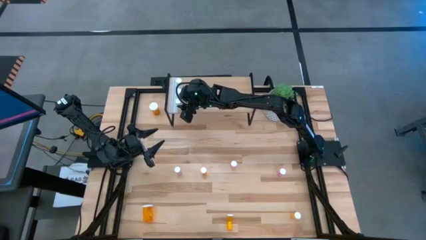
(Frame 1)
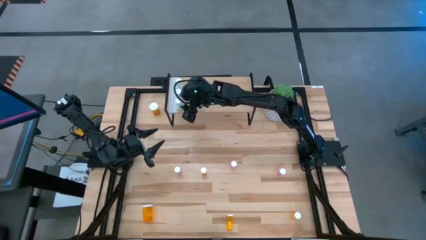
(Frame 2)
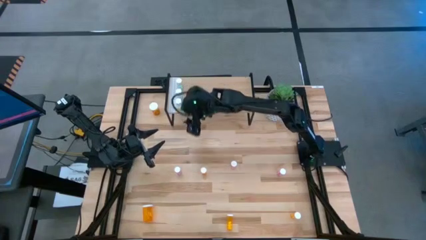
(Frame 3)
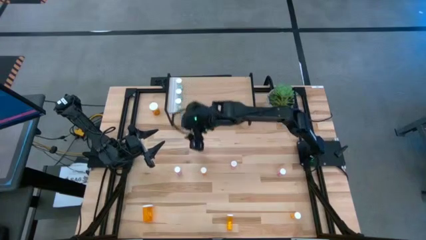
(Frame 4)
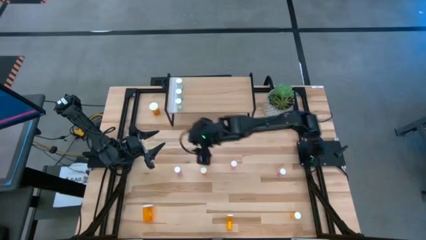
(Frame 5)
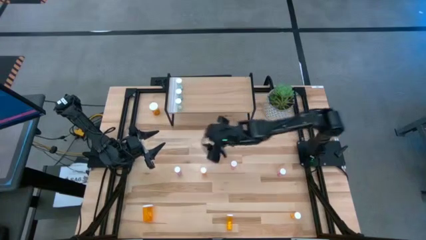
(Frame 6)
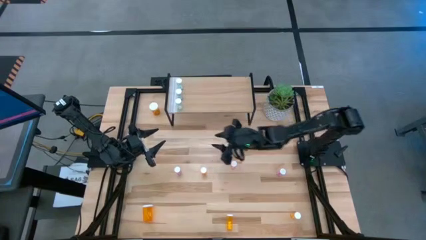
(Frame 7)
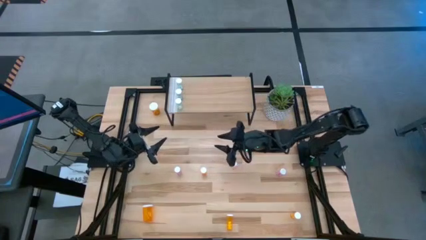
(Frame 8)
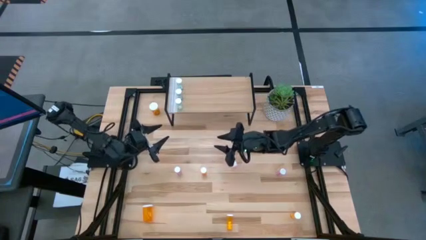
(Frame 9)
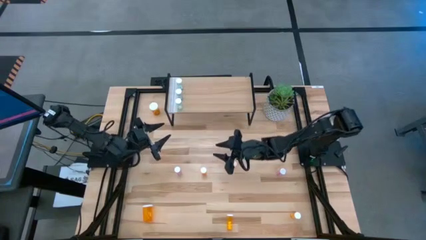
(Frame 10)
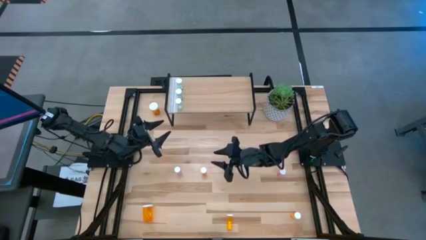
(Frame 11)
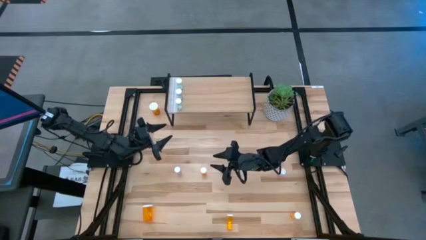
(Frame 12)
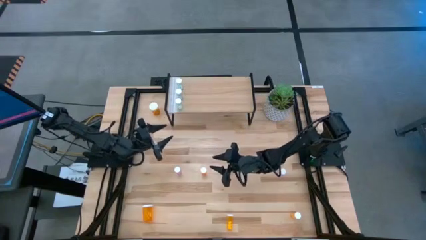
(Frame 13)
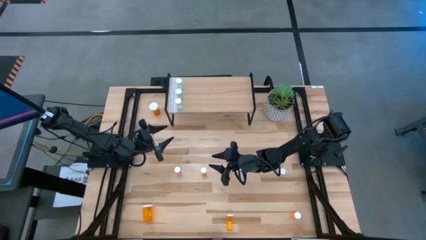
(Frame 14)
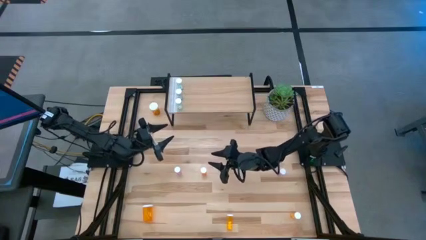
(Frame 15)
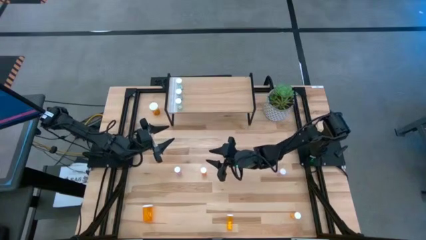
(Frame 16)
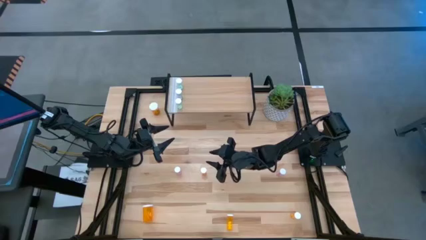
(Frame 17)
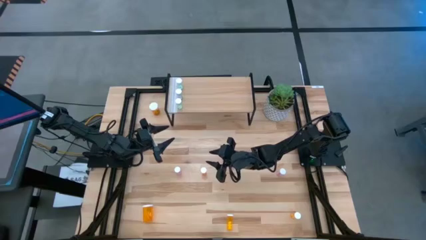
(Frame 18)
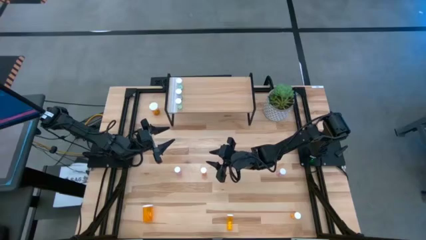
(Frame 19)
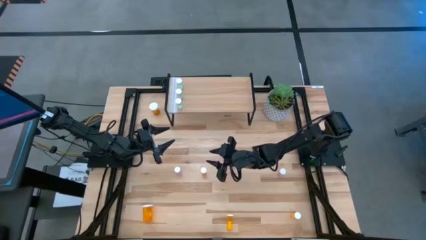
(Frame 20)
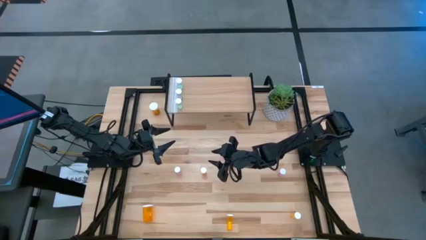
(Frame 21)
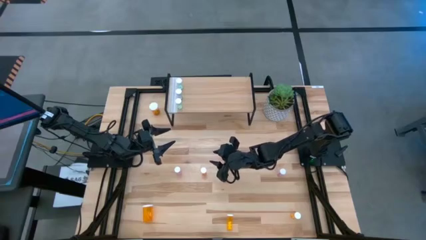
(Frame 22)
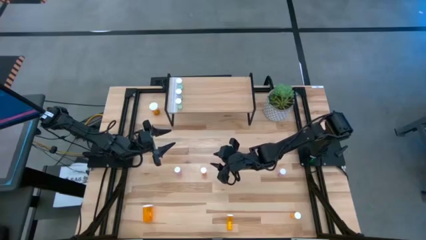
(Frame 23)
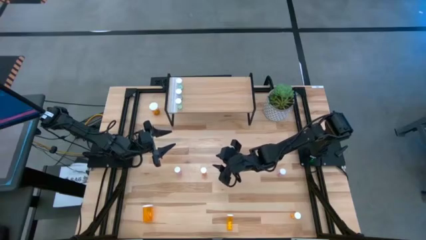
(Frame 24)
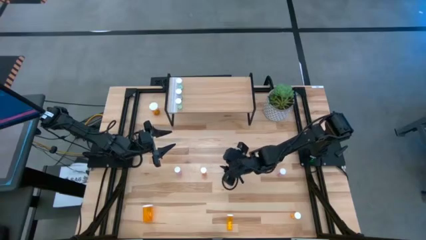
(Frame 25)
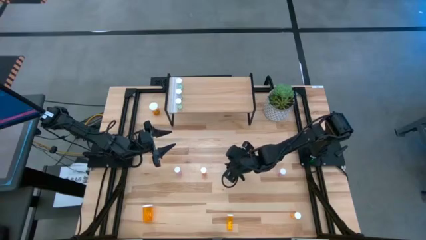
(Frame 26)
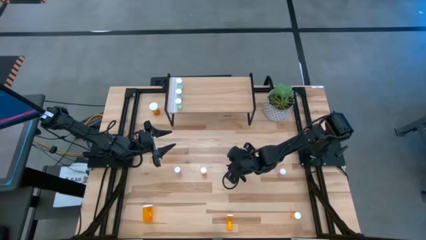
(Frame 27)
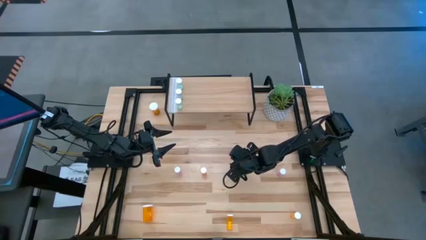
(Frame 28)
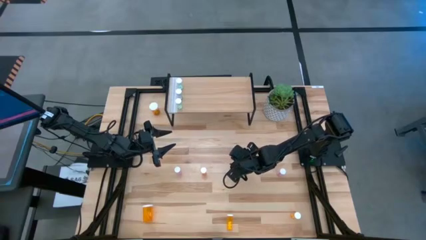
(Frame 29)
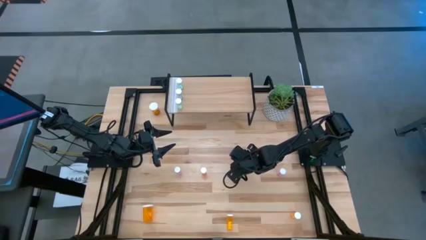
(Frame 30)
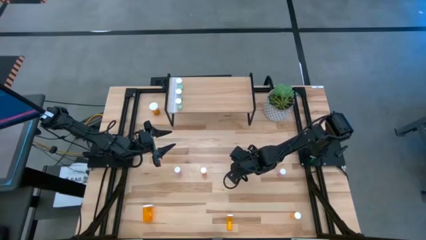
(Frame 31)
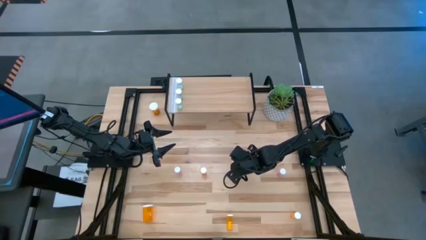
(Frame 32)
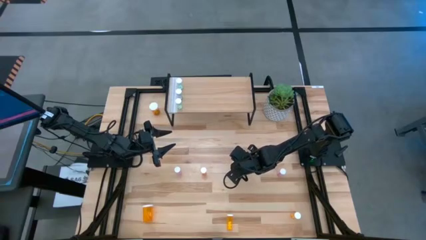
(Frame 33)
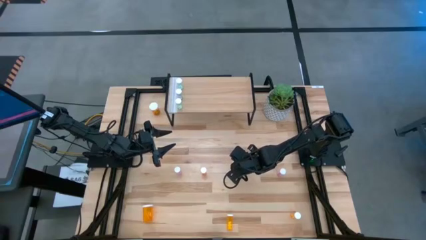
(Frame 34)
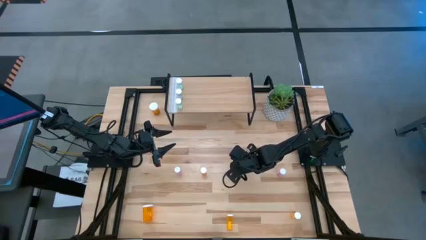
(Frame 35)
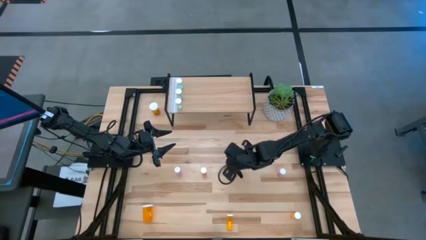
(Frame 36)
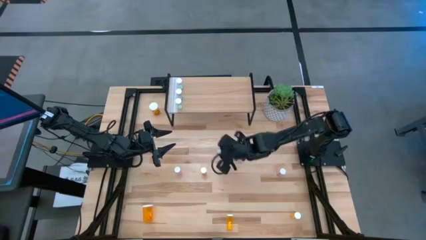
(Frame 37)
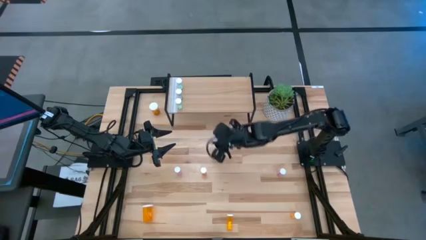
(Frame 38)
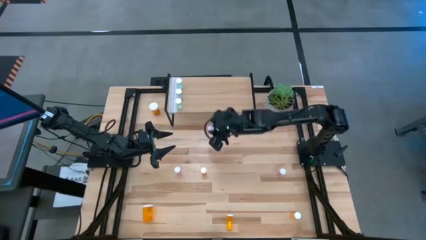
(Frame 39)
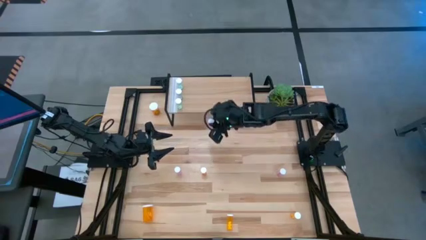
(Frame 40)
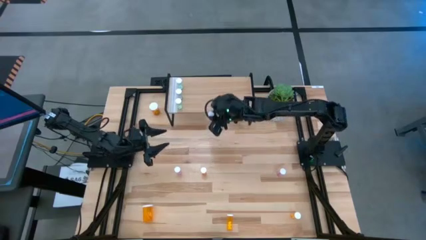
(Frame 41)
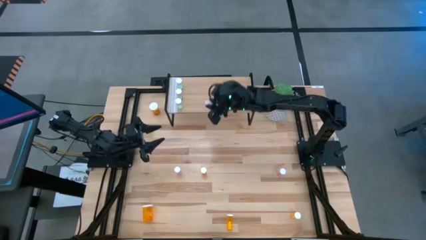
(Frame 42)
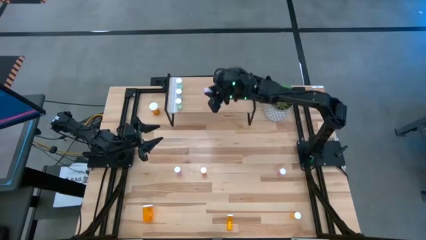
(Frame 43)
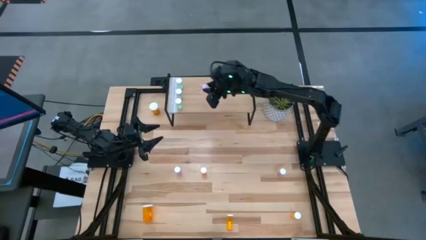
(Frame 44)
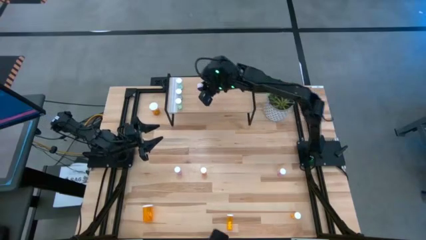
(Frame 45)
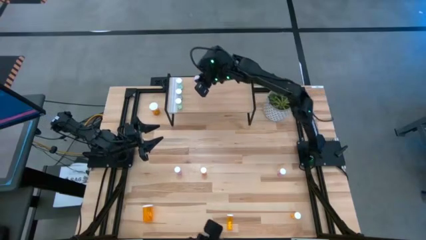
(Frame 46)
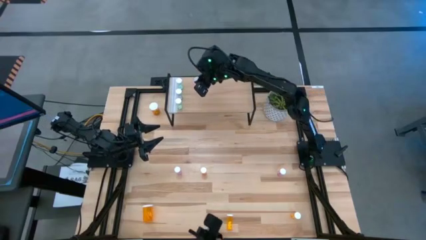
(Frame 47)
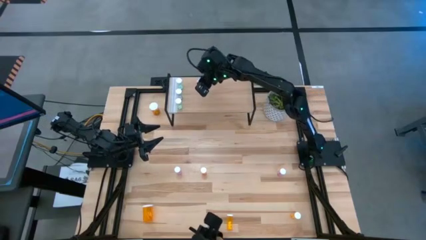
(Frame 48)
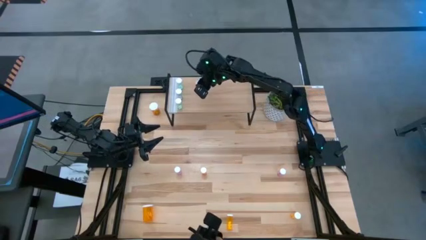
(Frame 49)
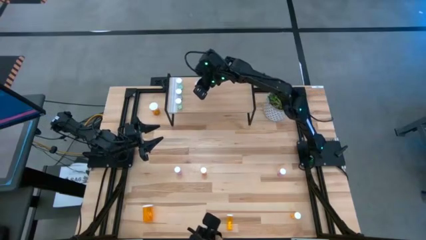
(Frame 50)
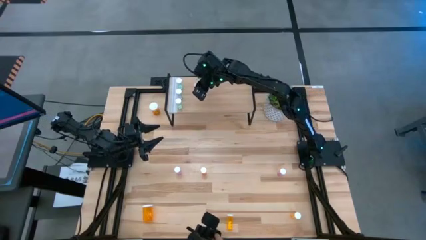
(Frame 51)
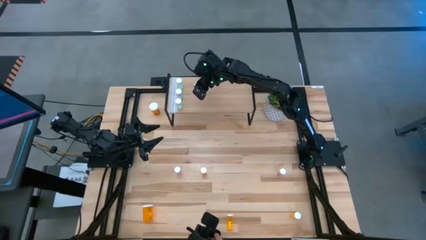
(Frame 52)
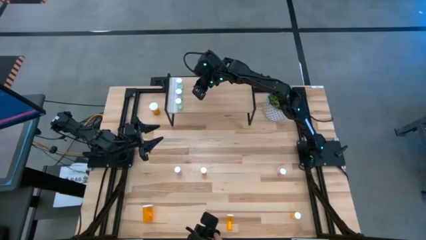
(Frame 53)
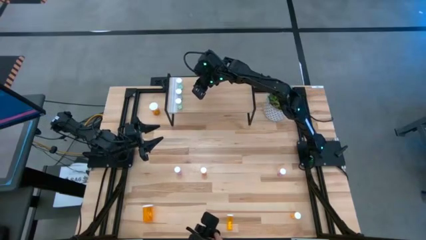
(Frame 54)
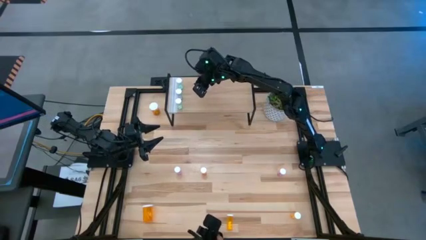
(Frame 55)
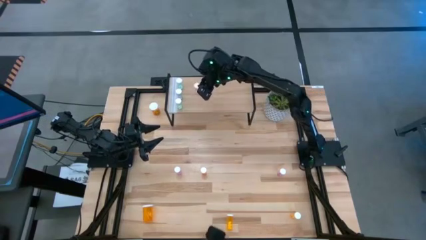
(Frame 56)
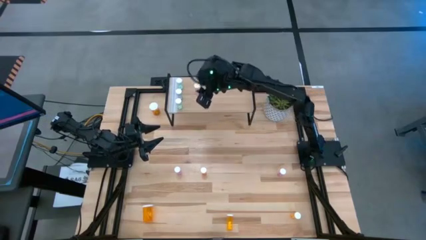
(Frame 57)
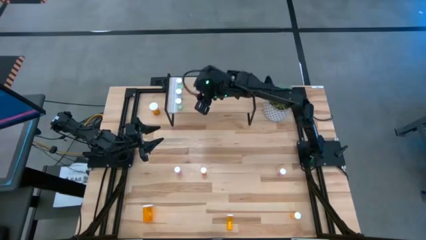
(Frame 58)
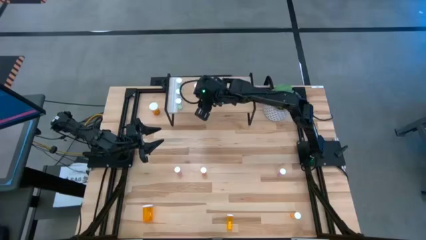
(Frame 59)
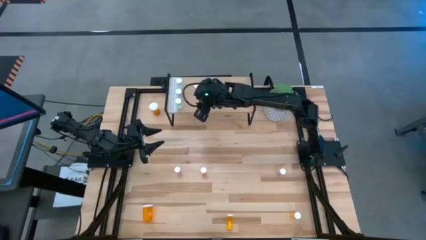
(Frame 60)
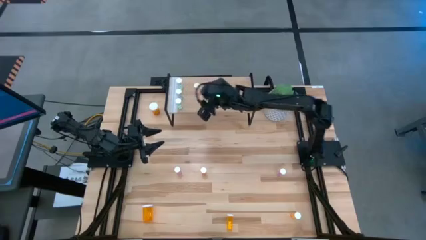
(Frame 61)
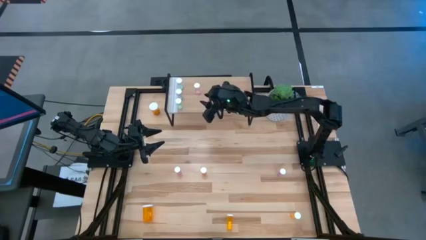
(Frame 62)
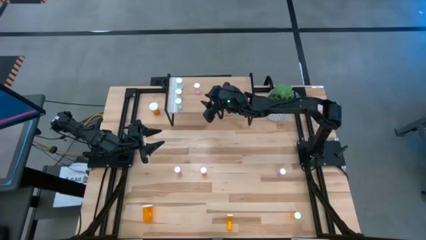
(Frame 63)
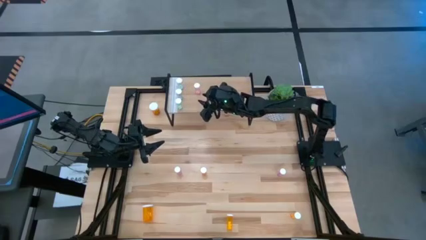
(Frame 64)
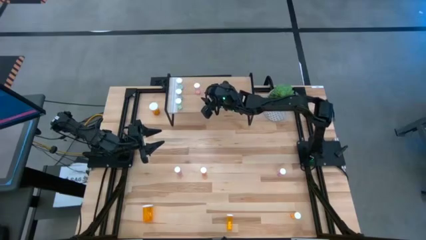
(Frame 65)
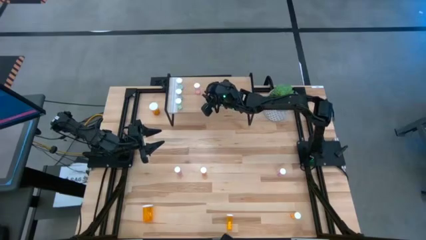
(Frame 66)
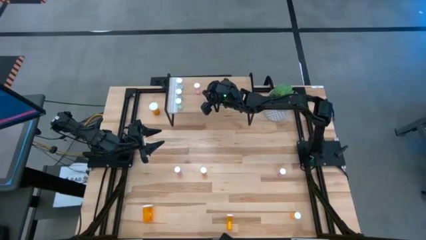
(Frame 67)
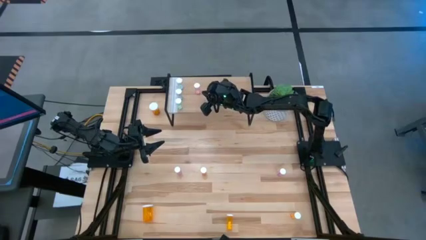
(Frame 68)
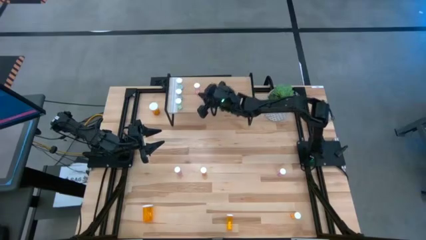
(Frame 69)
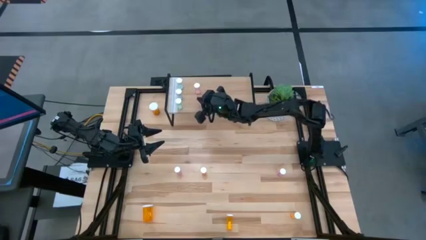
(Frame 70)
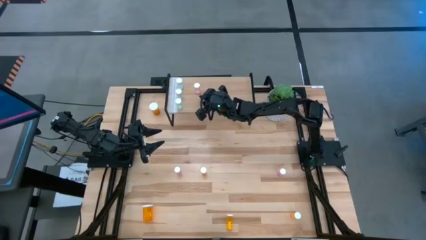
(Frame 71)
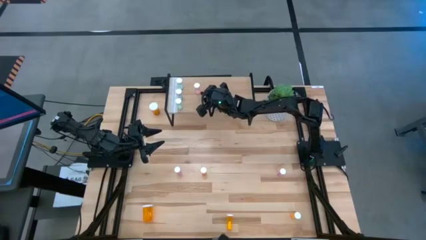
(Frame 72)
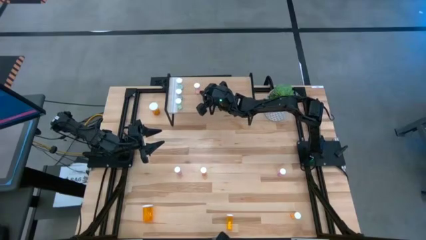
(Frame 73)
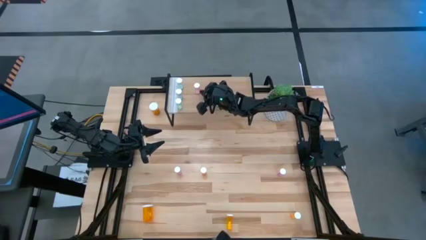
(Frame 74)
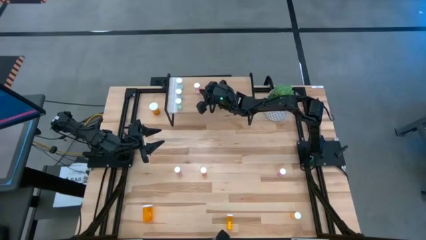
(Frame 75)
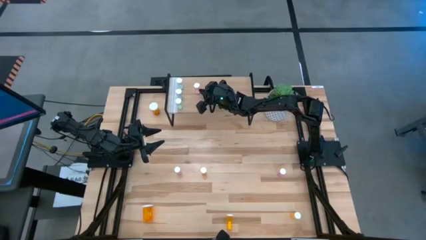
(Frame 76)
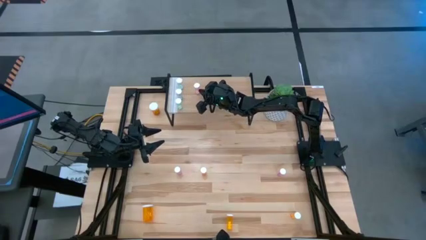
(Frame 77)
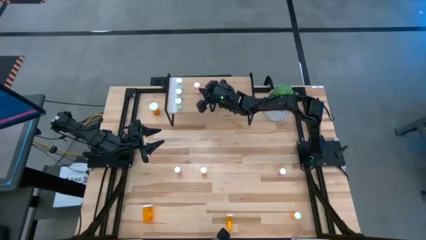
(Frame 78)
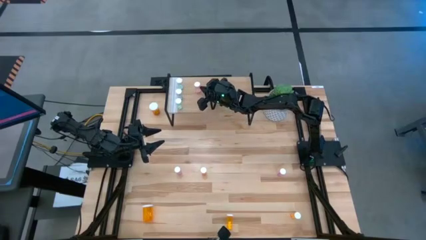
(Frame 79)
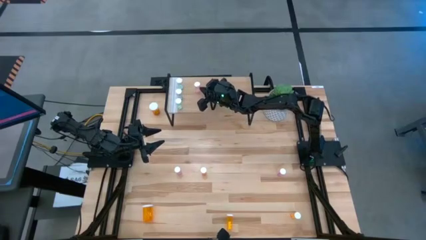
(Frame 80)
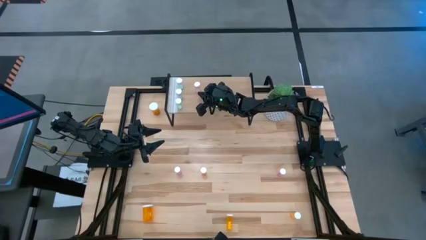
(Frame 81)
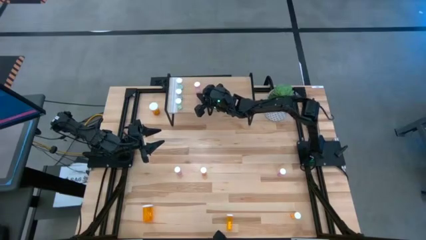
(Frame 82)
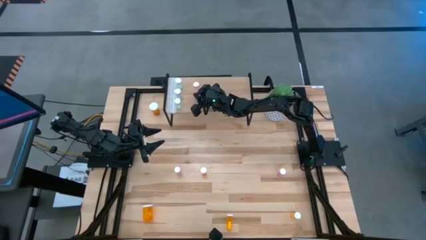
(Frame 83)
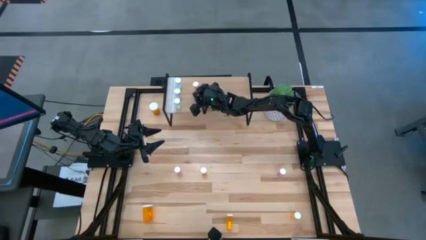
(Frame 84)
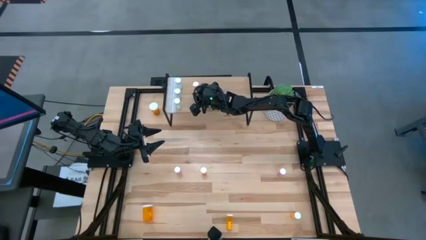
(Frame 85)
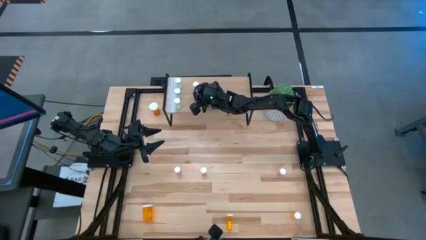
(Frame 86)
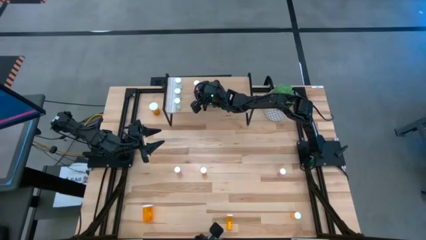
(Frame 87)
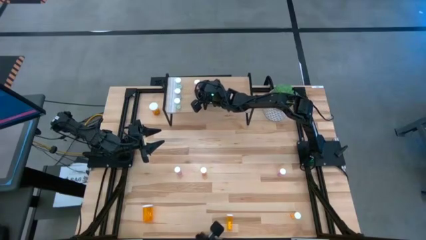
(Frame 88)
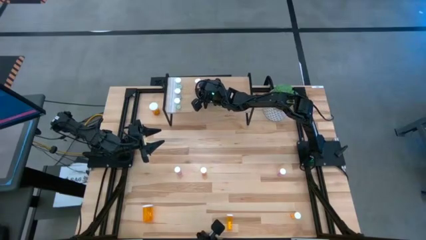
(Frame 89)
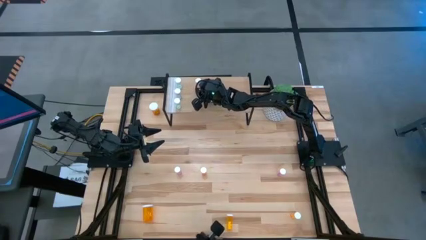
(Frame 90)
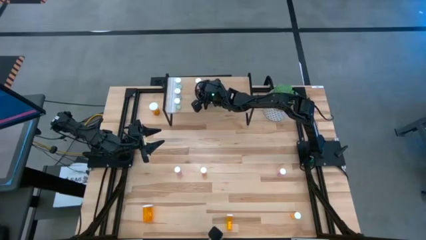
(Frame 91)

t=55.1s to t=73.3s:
Task: Pick and place medicine bottles onto shelf by color
Put the middle pink pill bottle on the shelf
